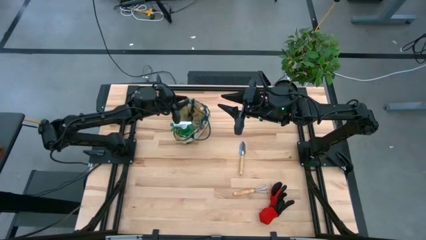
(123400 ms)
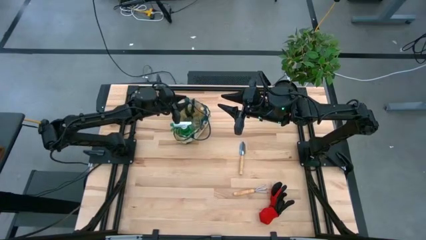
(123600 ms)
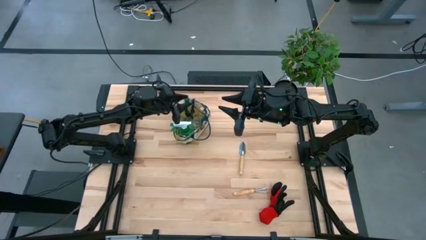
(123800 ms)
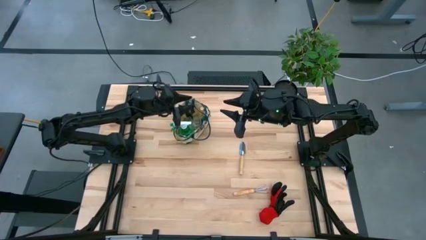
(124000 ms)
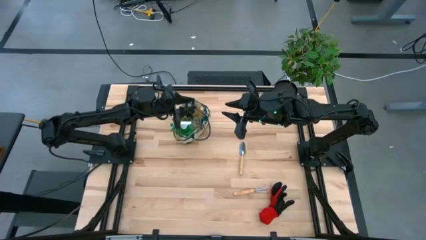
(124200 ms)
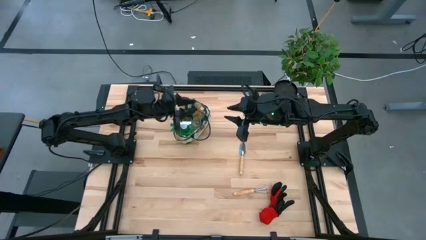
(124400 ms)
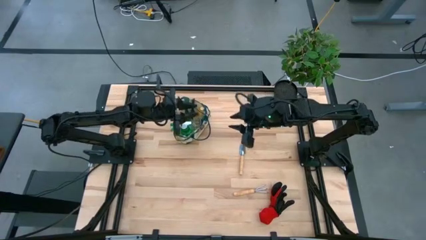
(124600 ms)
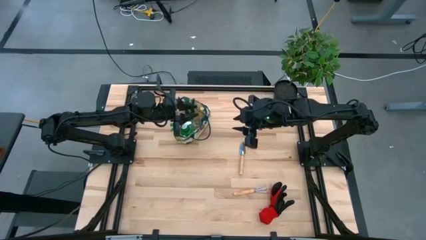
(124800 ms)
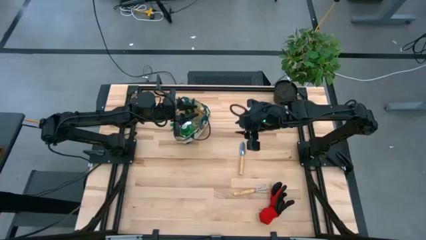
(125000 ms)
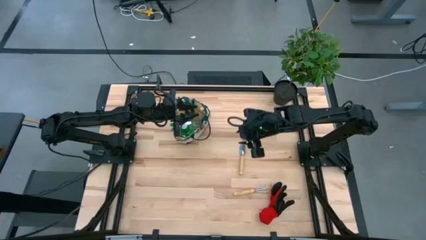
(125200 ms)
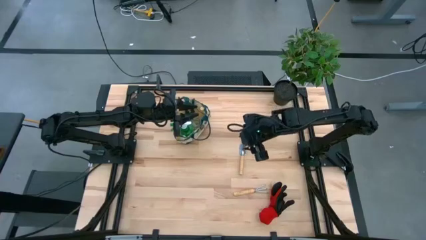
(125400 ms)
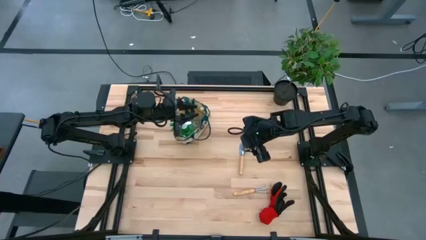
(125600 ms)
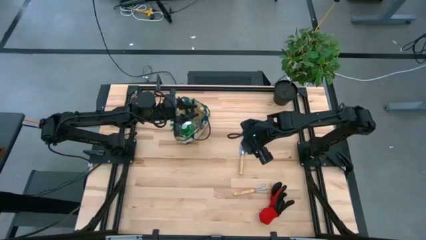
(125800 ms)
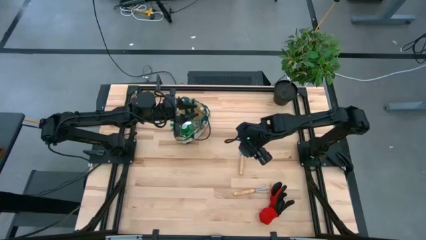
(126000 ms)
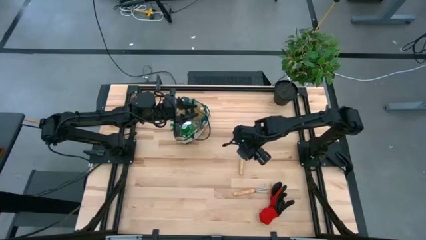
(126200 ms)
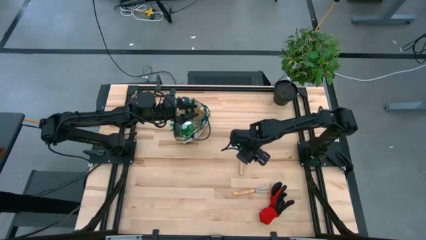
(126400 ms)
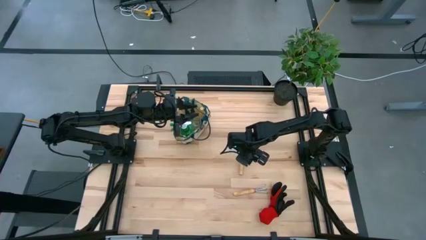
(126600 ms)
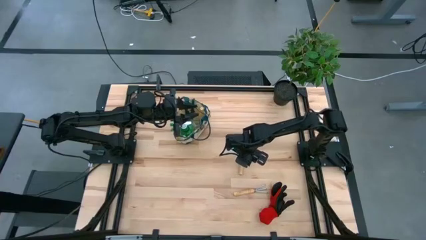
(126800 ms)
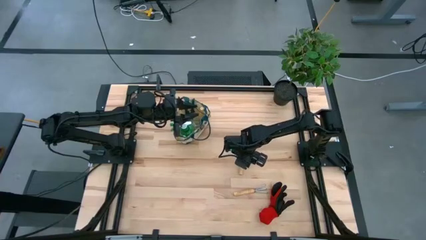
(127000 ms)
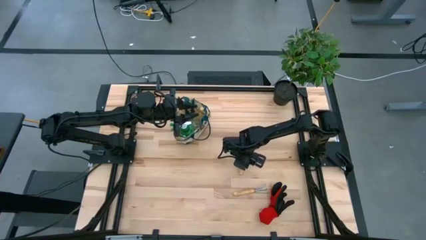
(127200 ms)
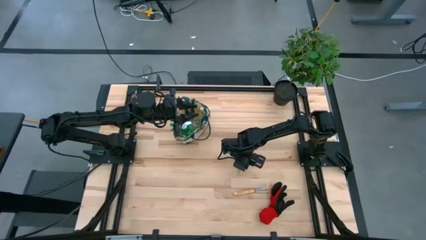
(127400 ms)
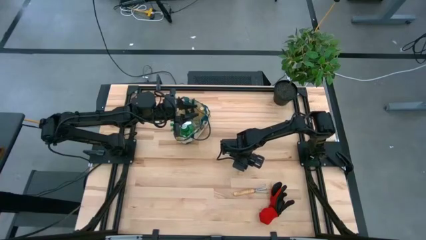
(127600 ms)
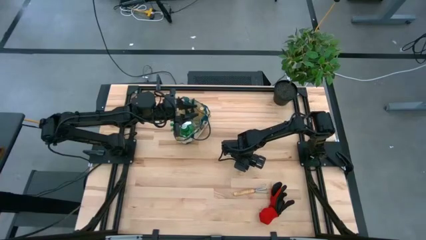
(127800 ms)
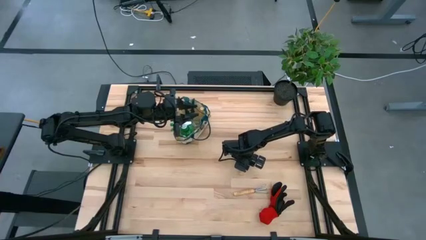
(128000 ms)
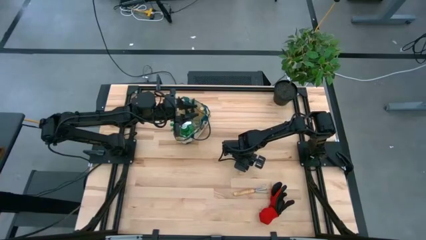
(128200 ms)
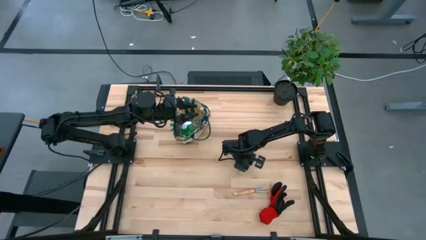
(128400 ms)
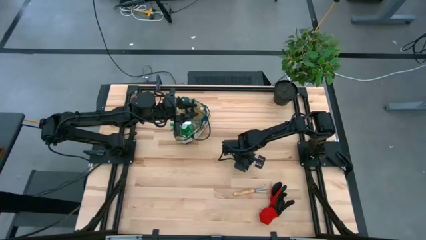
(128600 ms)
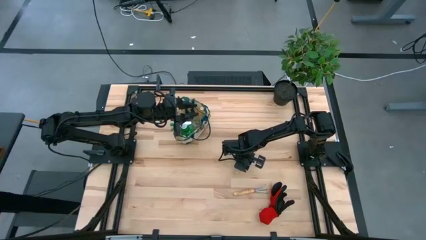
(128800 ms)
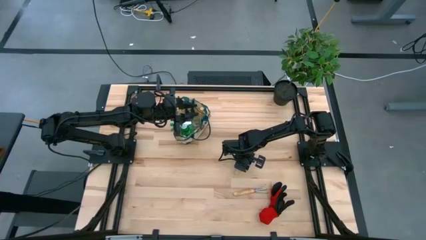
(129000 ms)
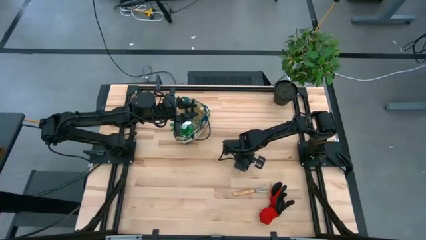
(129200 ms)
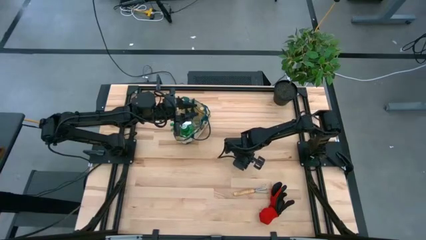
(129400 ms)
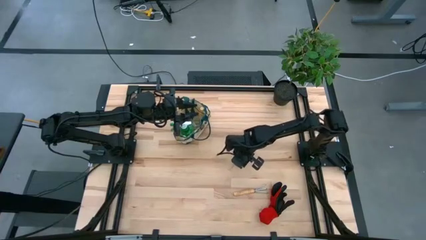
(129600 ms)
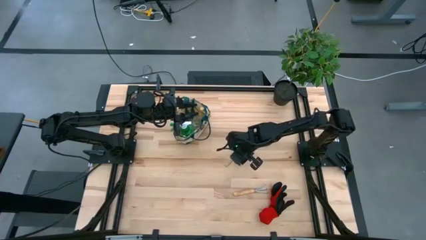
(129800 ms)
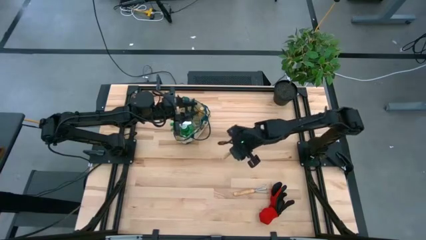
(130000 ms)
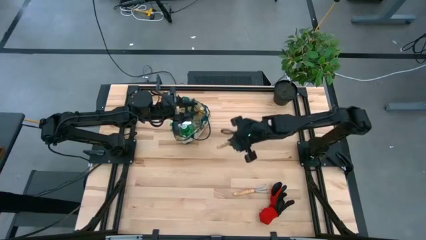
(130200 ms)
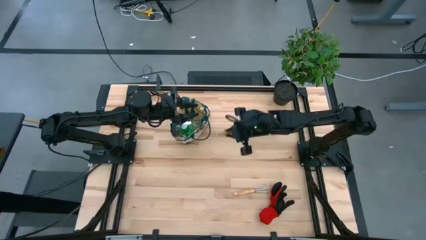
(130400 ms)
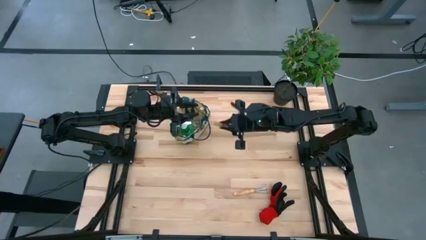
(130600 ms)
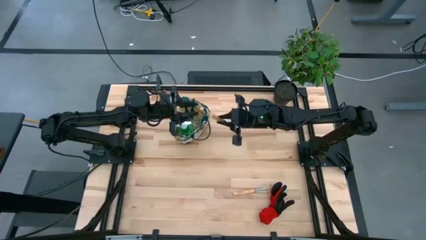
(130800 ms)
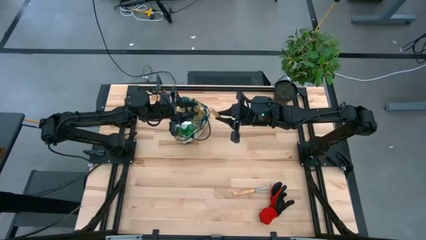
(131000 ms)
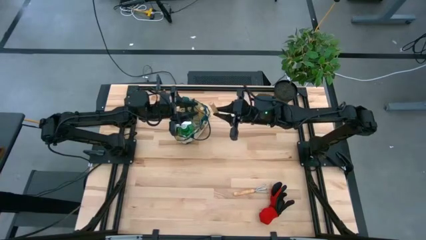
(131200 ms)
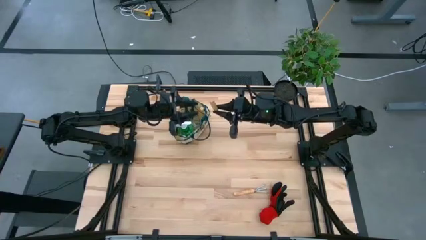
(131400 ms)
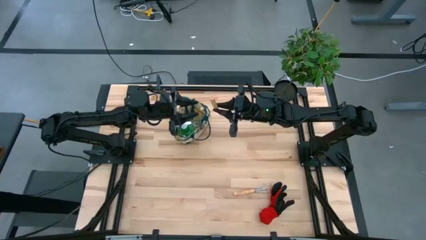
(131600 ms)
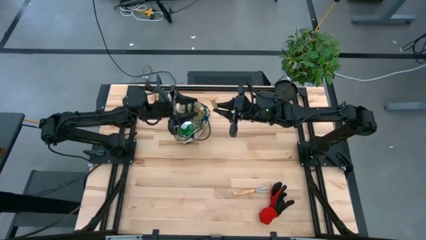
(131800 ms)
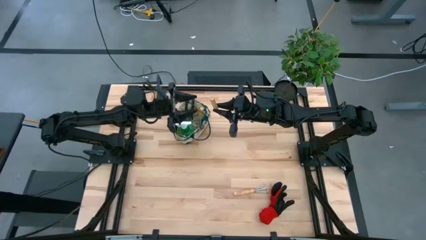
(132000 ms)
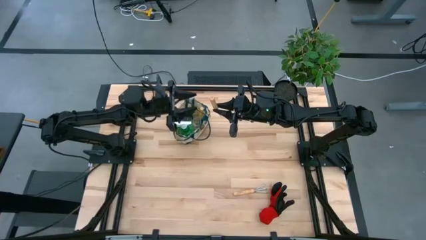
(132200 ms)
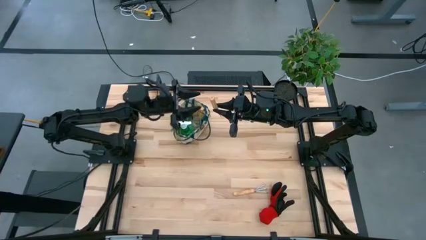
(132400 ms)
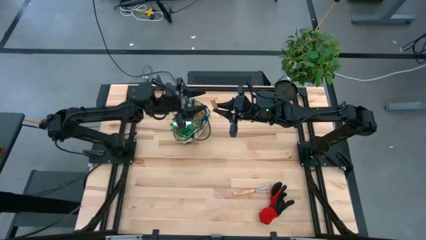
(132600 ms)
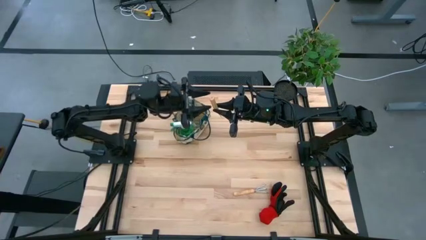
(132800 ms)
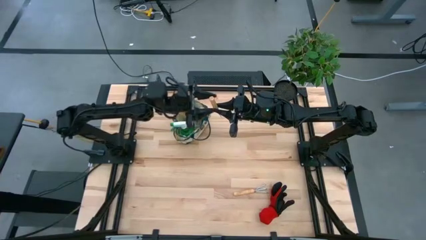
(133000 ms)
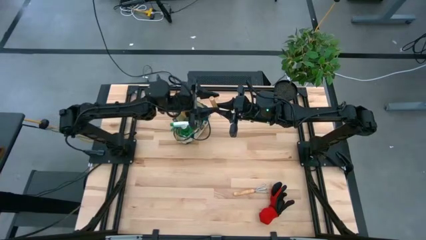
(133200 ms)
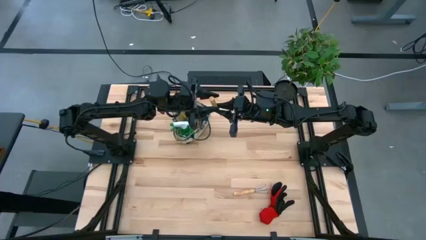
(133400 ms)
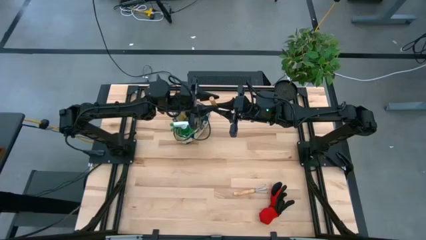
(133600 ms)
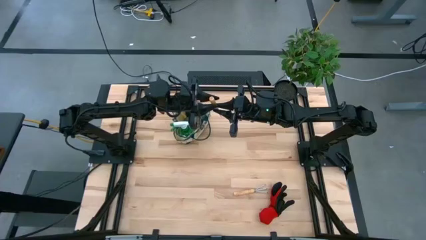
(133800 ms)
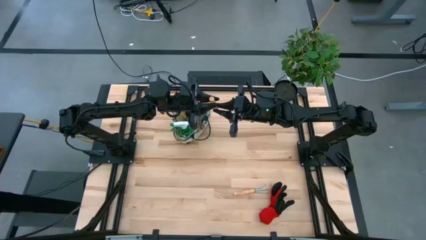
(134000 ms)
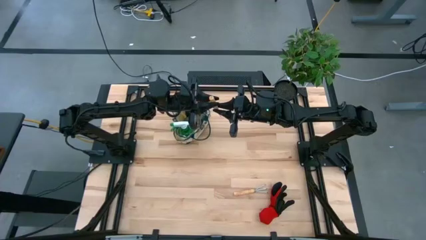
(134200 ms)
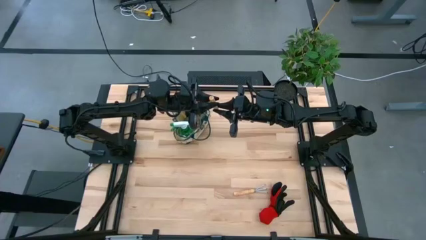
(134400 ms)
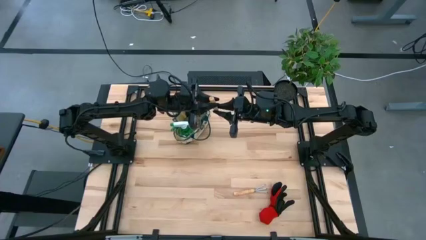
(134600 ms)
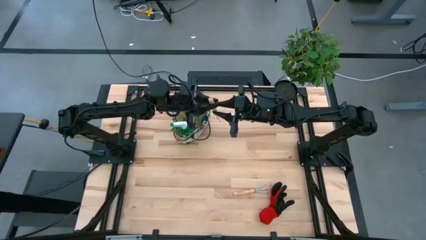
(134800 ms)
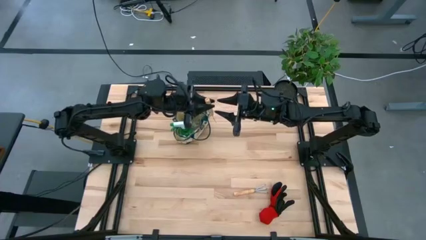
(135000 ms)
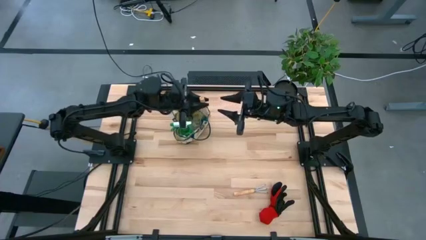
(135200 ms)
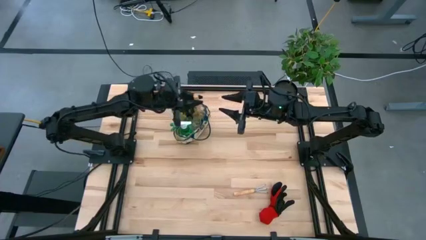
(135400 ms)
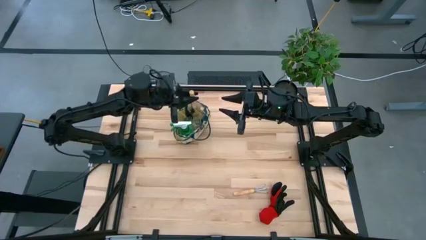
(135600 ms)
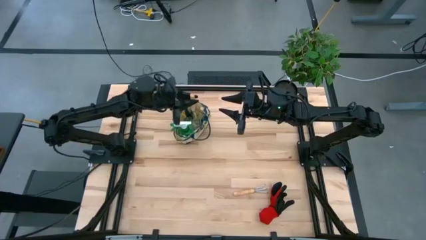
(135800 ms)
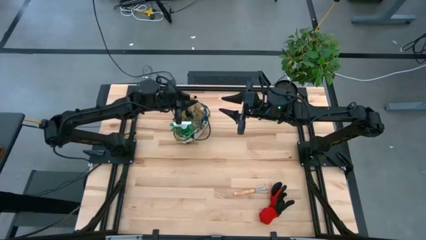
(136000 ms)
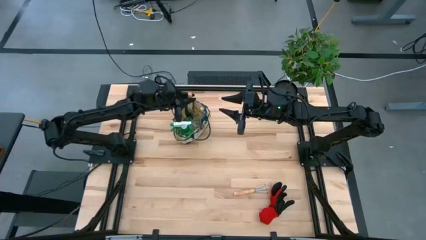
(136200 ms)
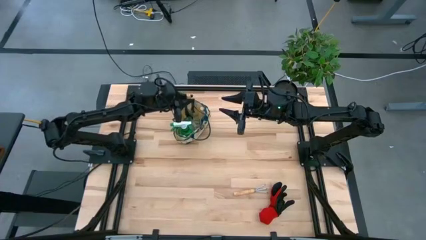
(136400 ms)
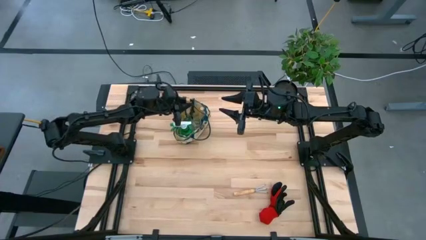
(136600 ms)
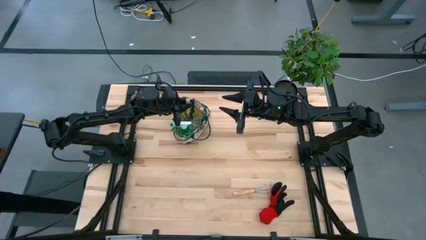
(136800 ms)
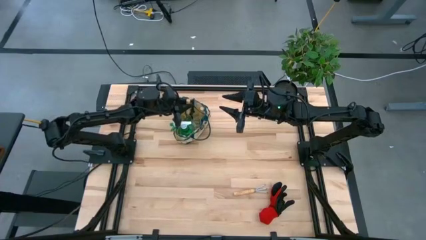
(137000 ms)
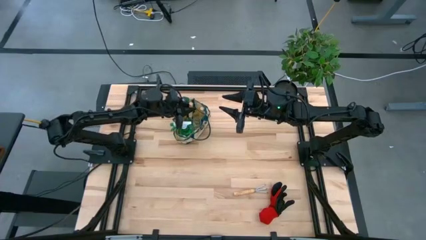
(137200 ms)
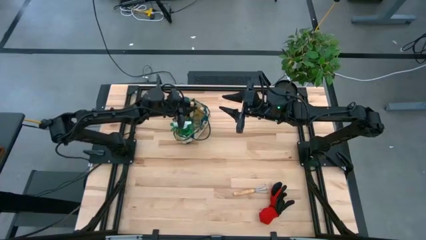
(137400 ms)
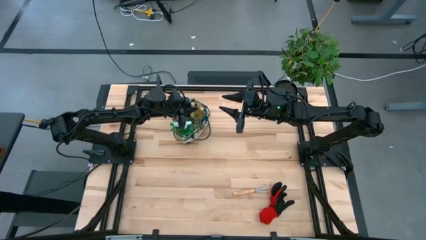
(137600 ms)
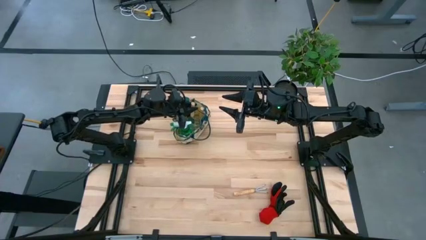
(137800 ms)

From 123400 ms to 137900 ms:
Task: Pick & Place Garden tools in Gardening bag
Put the brown trowel into the gardening bag
